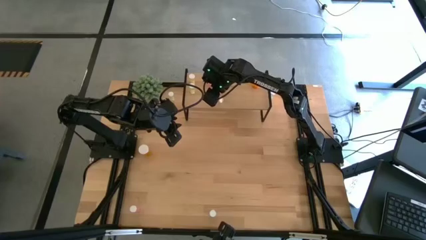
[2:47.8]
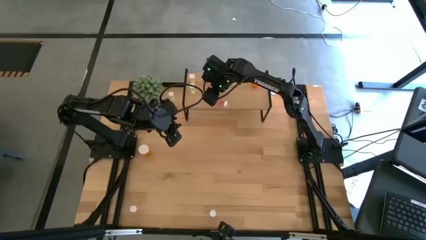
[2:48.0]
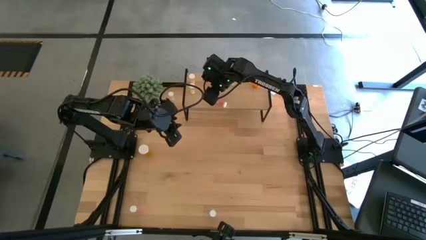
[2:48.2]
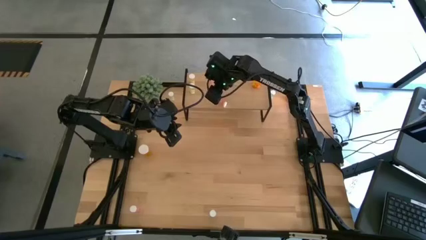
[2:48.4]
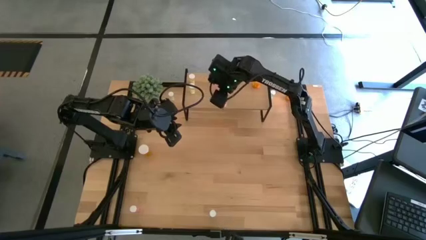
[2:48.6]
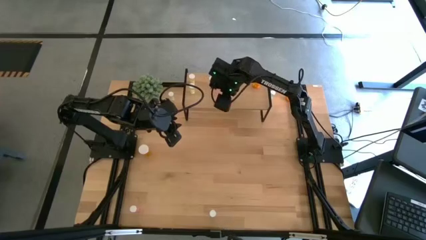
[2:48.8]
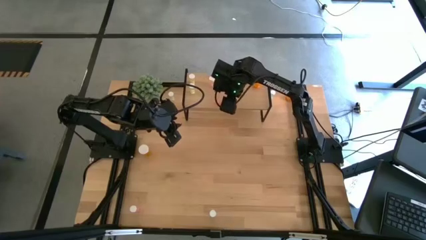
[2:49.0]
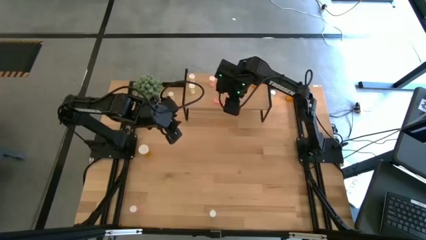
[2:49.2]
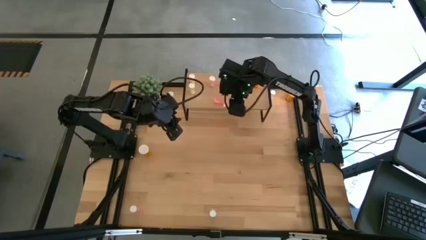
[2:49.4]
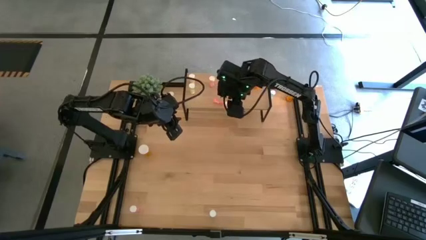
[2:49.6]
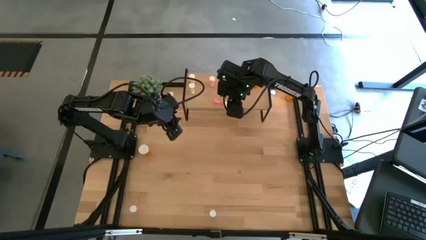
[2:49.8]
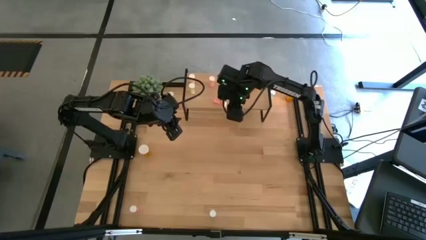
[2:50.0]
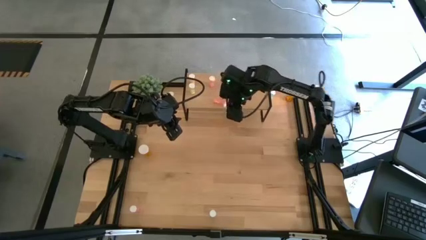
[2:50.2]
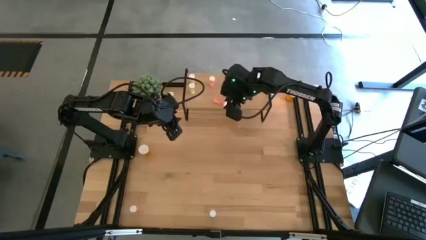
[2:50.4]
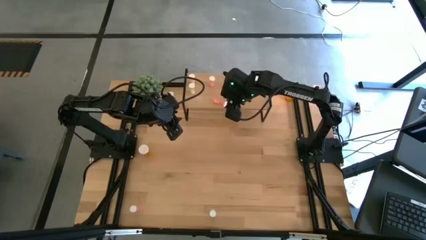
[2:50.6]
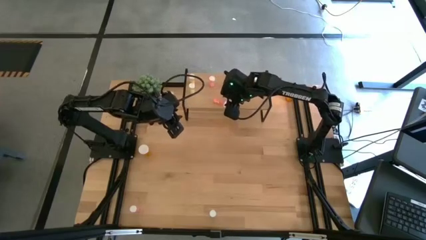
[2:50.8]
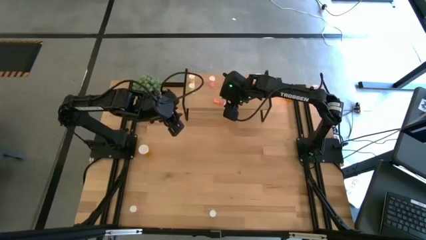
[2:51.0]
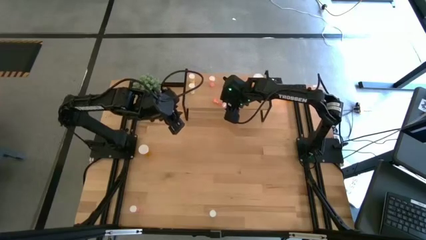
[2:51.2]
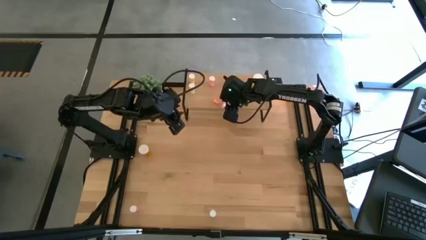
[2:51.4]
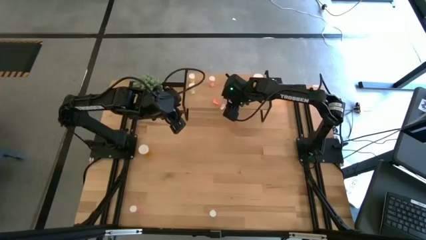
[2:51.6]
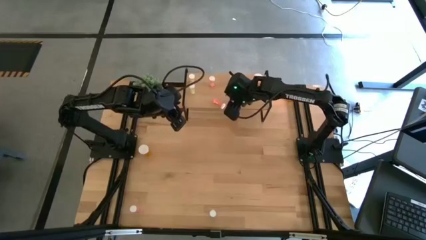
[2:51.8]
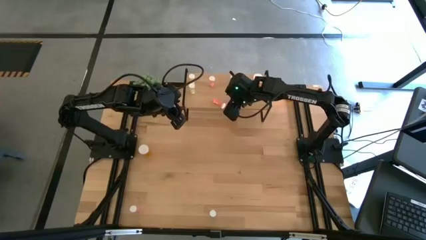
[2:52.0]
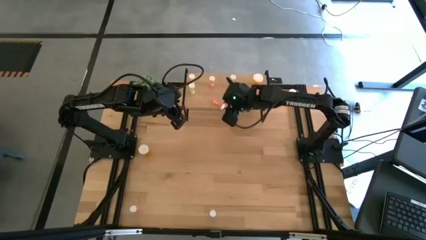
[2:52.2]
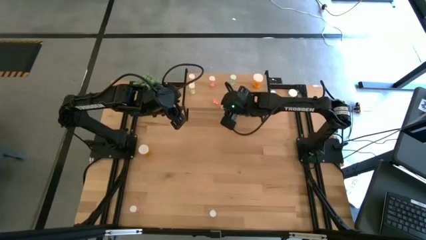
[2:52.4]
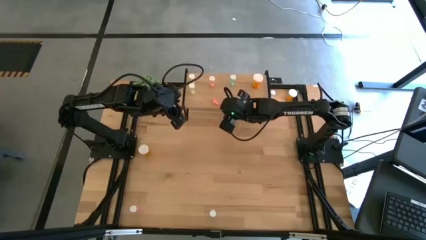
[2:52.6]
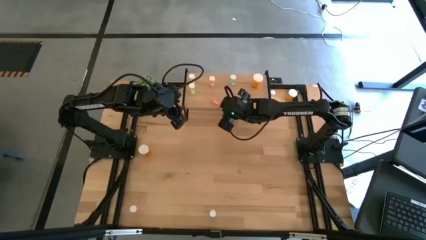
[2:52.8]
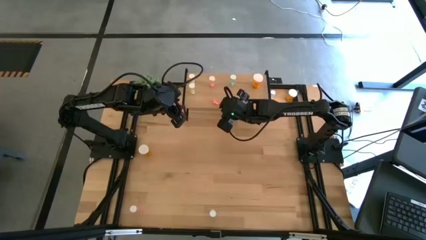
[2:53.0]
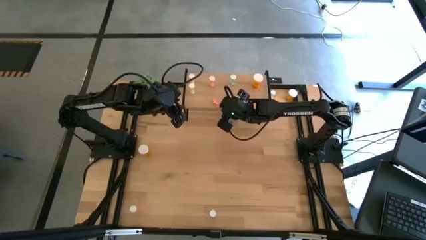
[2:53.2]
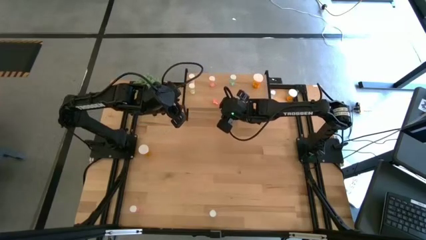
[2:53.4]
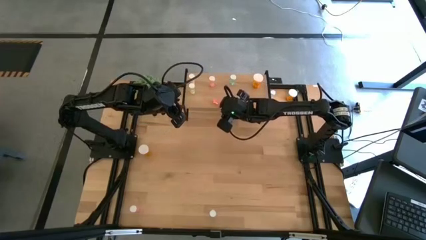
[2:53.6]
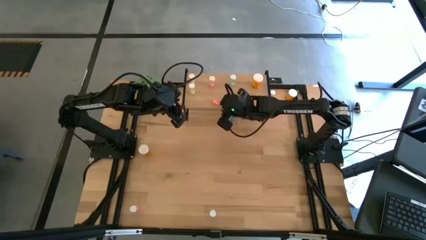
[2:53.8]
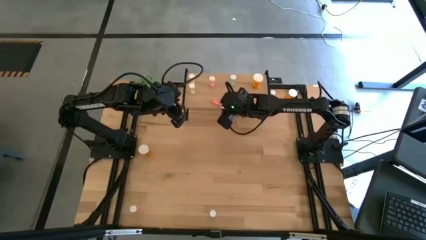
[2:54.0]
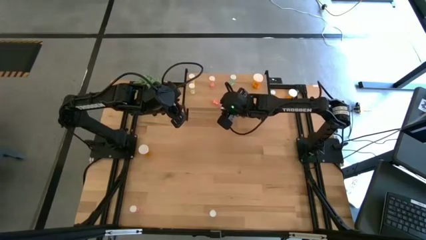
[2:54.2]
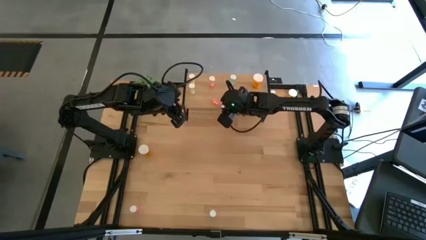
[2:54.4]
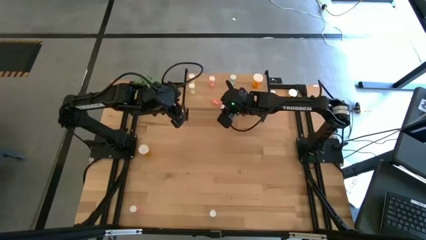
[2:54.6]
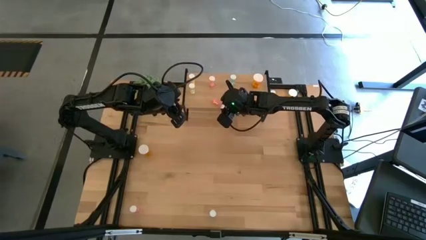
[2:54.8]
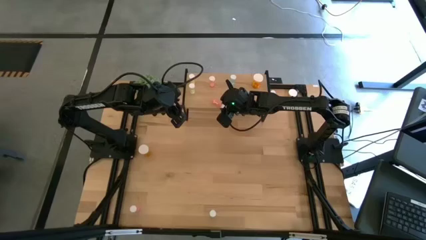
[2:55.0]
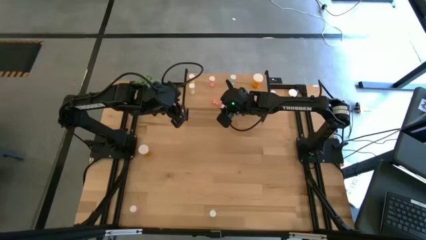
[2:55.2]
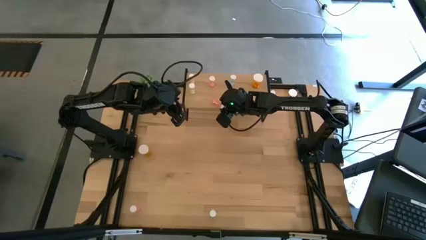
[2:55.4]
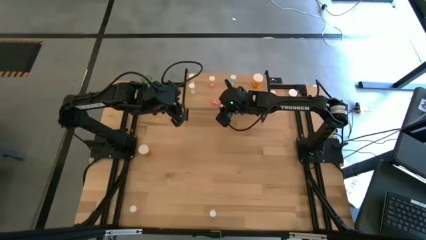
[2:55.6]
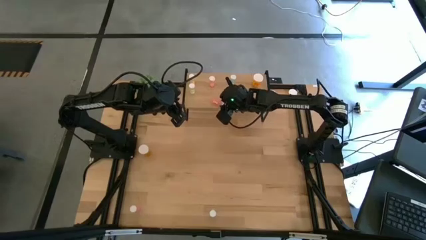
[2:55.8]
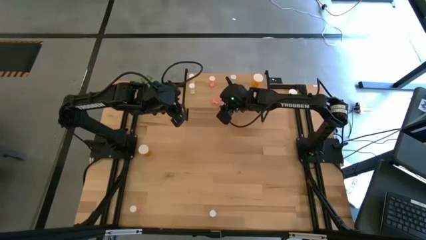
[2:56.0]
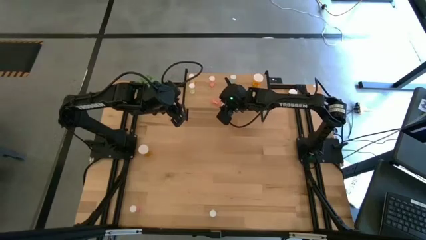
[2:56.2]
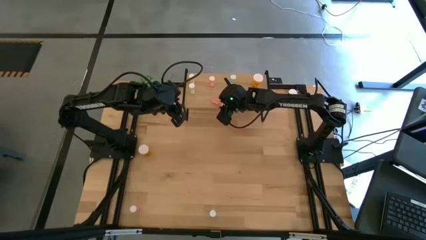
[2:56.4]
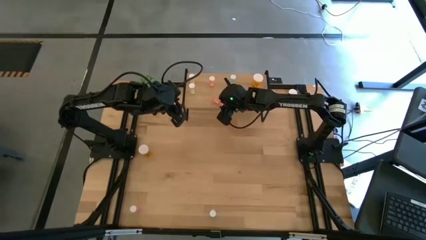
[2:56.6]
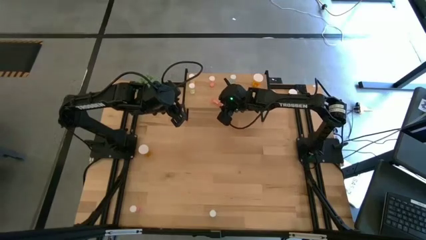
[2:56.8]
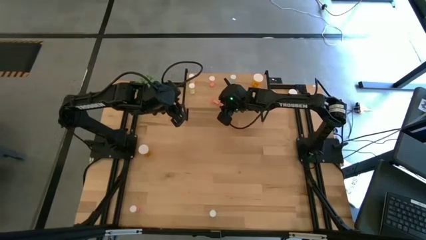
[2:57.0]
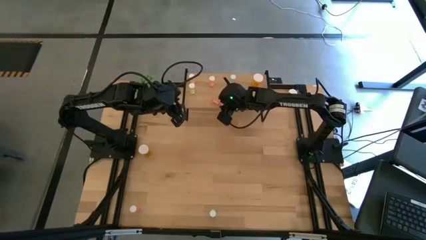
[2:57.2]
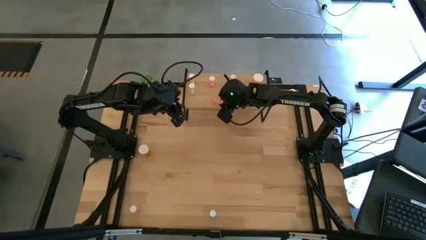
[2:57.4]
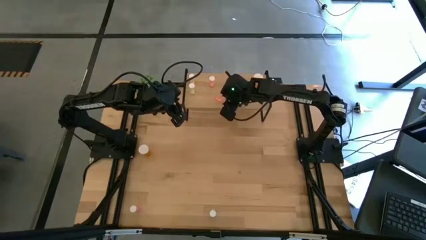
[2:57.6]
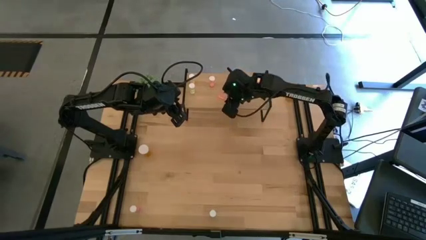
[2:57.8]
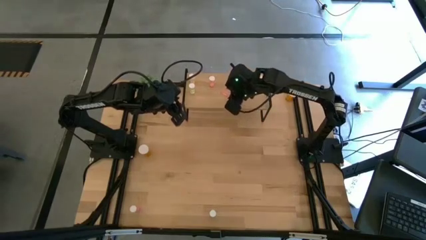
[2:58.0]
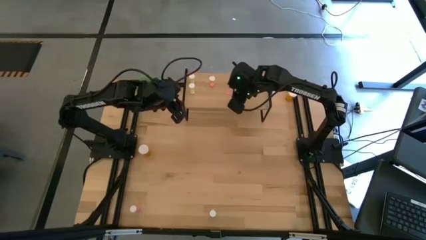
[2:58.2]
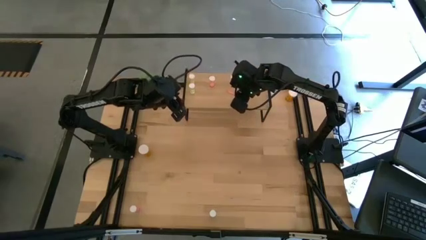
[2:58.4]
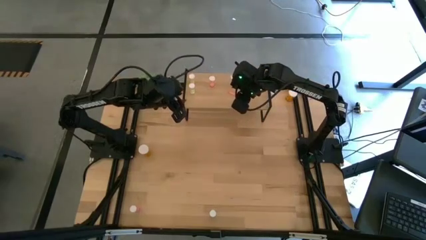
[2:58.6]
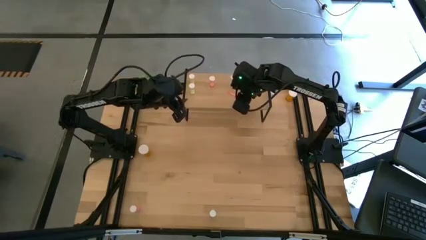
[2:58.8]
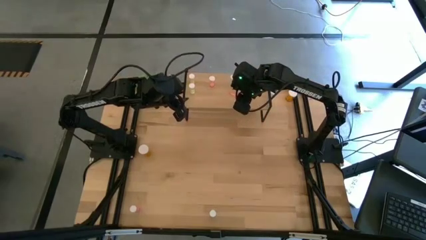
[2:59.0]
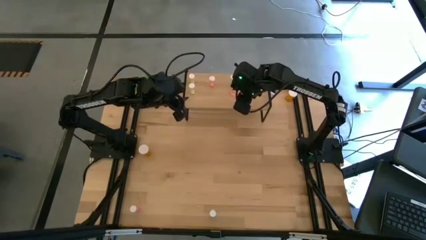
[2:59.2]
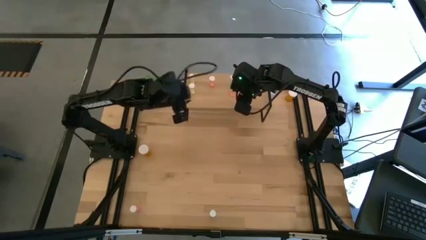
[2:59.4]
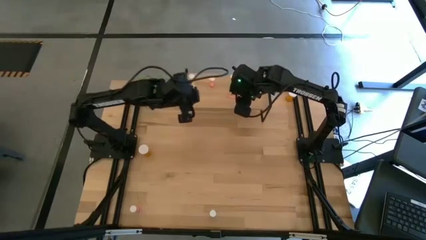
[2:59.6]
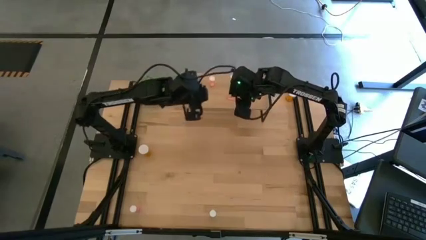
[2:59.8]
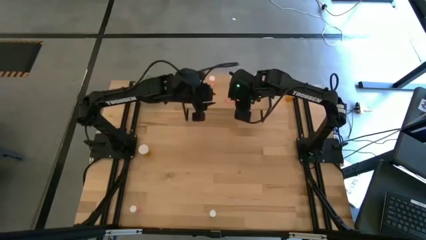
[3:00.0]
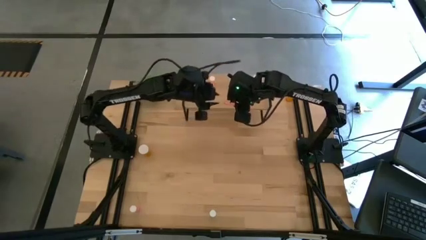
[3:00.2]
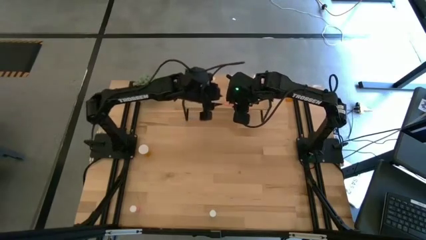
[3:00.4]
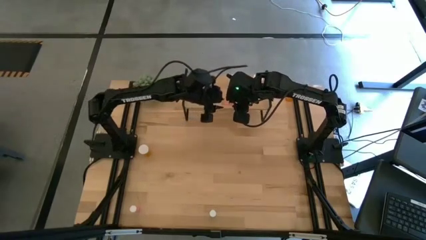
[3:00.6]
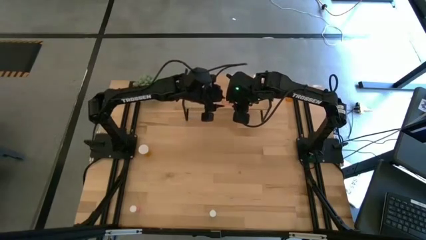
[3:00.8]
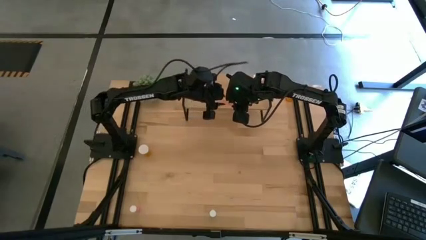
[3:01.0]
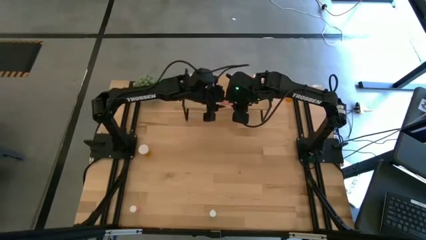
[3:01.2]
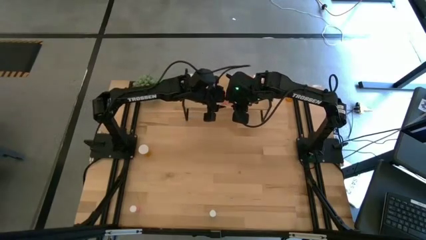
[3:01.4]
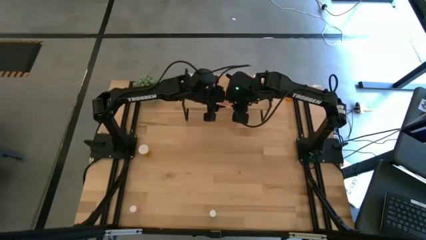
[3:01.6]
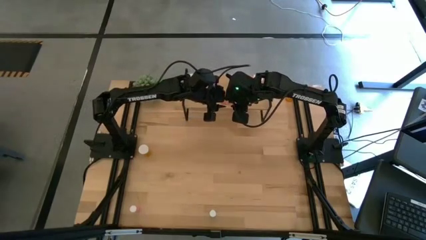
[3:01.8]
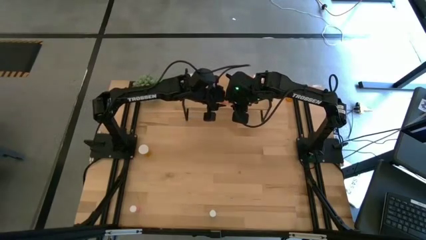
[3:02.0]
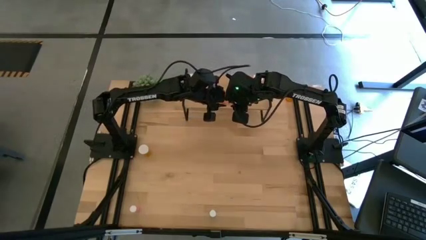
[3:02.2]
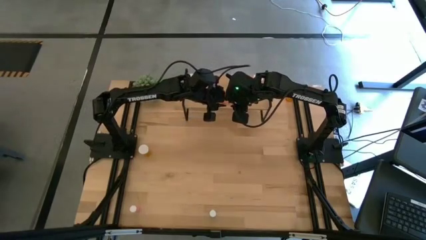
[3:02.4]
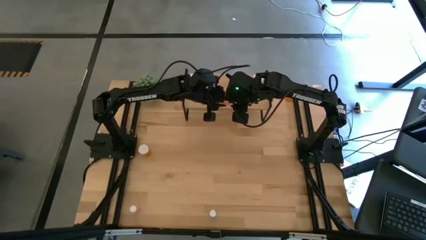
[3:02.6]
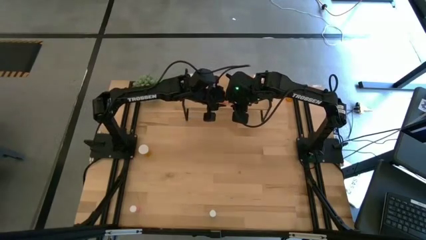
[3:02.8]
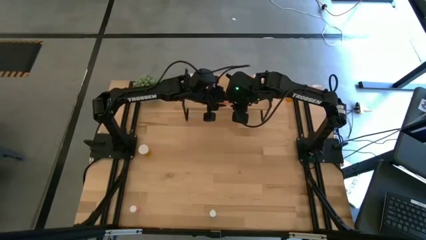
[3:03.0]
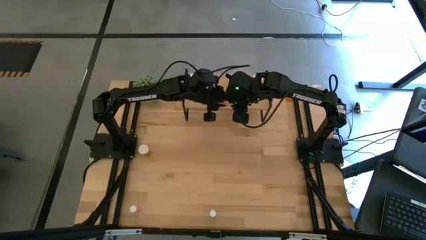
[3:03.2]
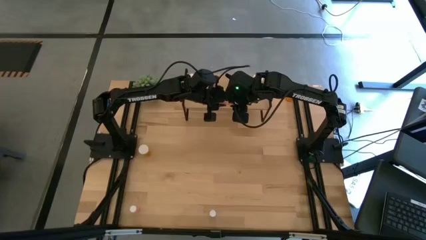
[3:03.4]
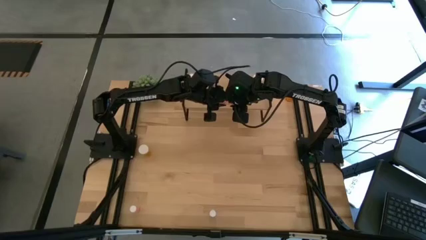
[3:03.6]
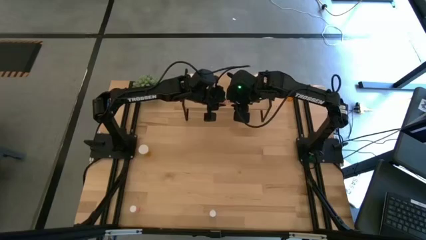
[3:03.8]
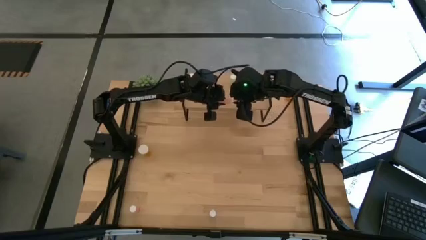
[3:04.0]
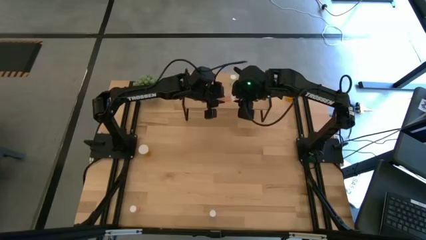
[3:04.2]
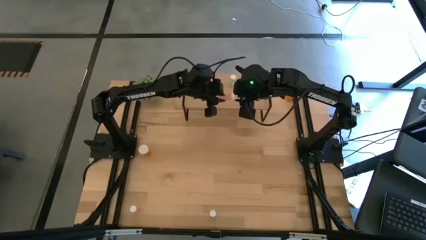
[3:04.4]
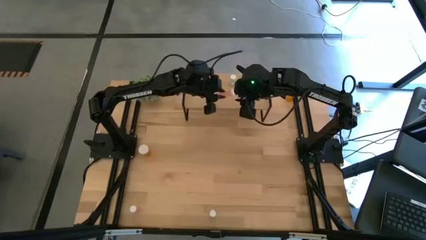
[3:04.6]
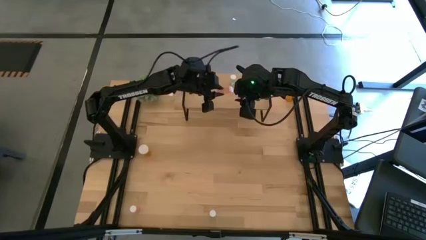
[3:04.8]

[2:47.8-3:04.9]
Task: Pick and place medicine bottles onto shelf by color
Put the top pink pill bottle on the shelf aligned with the other pink pill bottle
